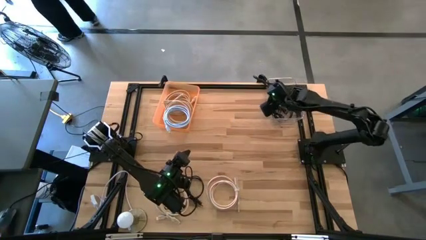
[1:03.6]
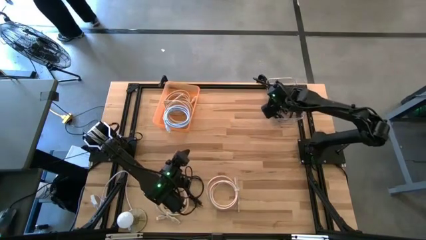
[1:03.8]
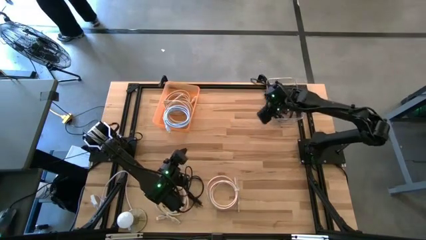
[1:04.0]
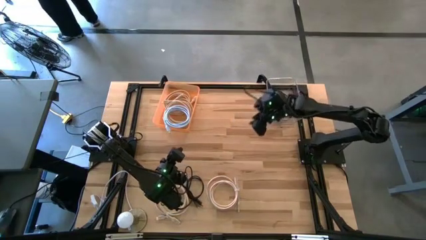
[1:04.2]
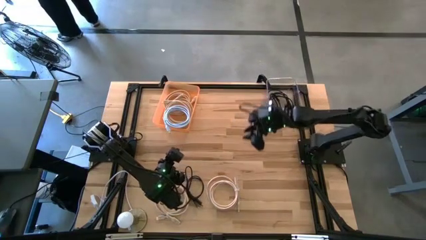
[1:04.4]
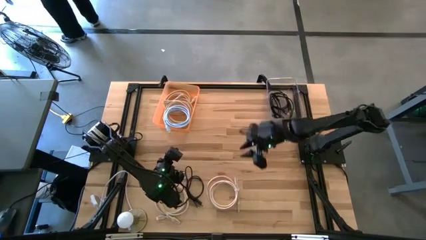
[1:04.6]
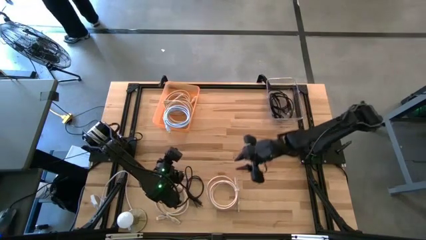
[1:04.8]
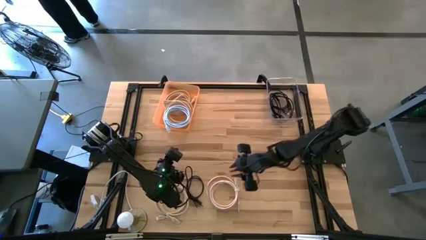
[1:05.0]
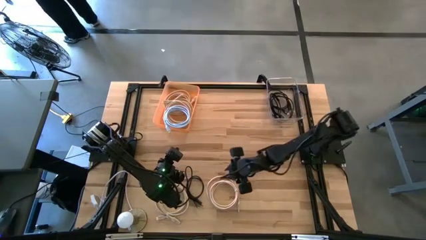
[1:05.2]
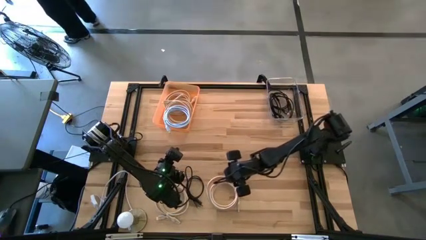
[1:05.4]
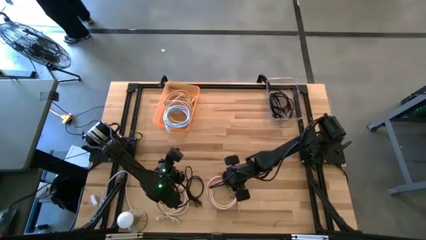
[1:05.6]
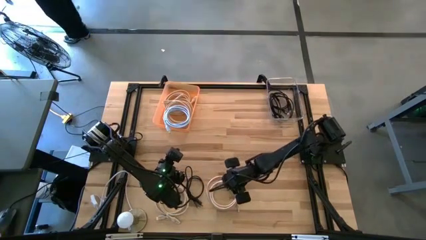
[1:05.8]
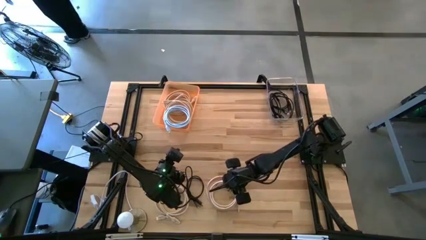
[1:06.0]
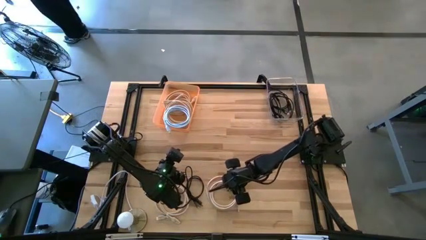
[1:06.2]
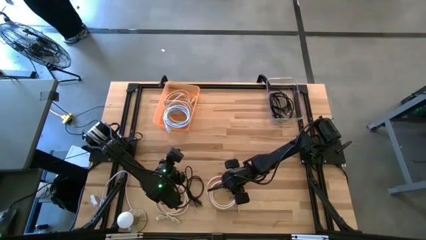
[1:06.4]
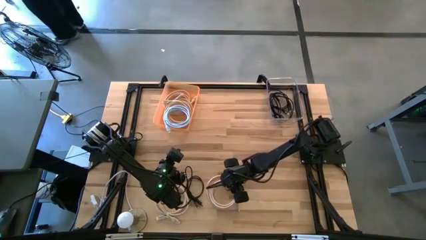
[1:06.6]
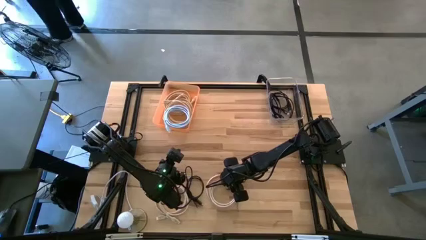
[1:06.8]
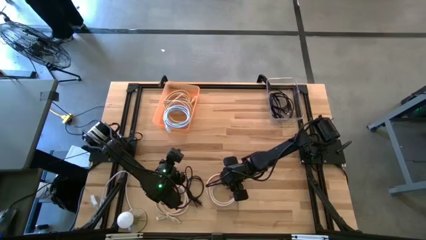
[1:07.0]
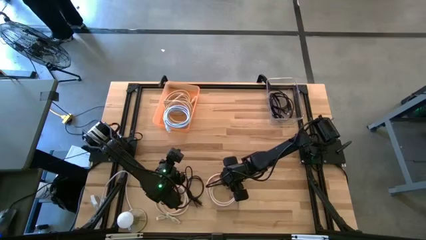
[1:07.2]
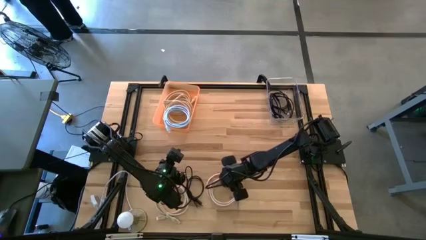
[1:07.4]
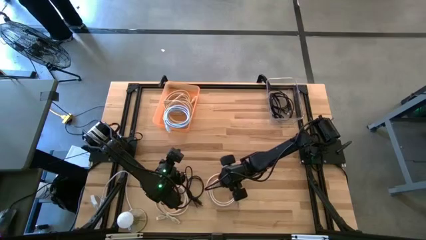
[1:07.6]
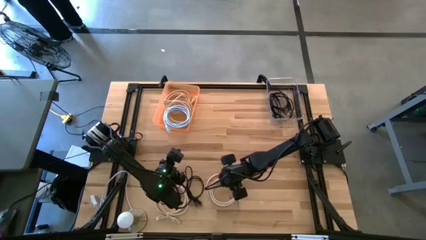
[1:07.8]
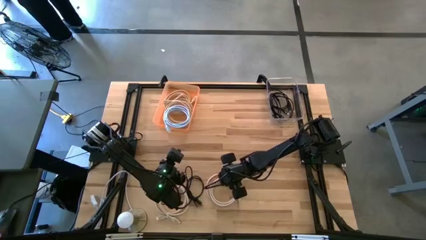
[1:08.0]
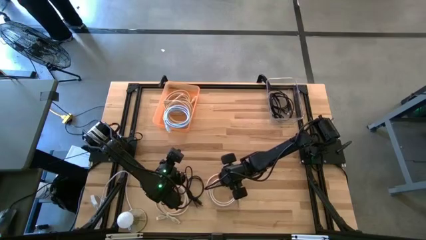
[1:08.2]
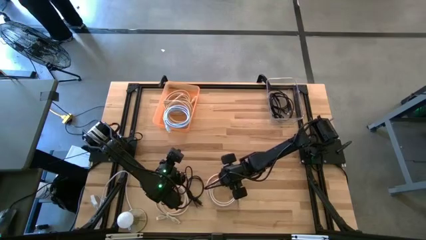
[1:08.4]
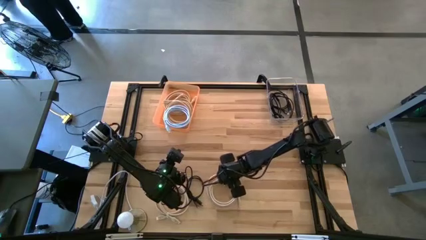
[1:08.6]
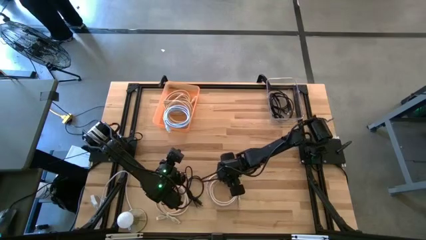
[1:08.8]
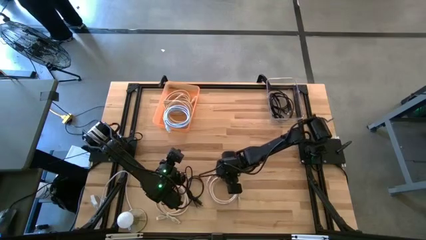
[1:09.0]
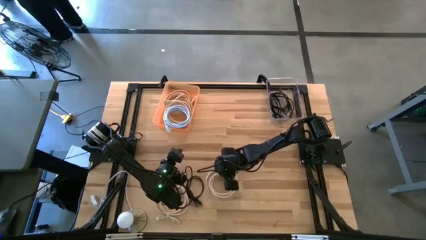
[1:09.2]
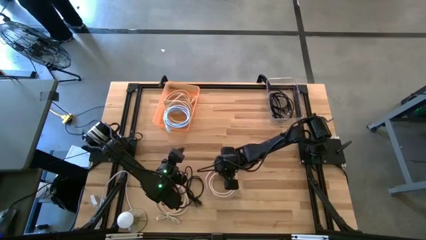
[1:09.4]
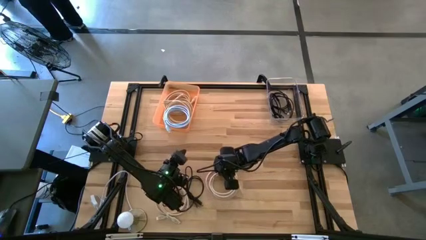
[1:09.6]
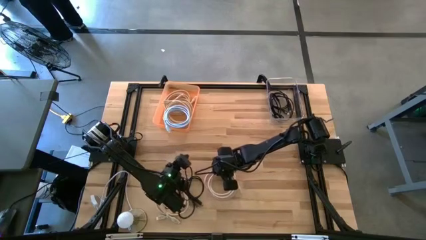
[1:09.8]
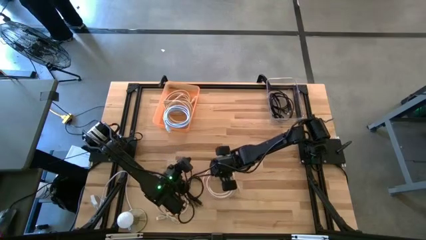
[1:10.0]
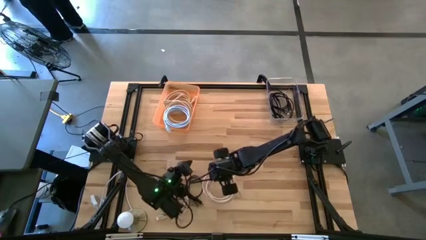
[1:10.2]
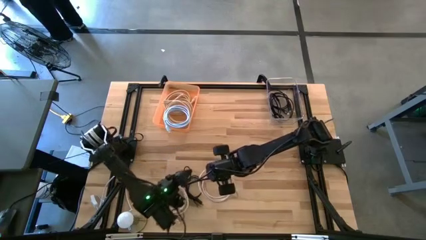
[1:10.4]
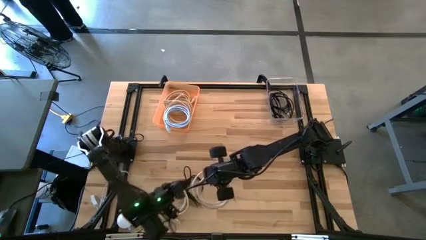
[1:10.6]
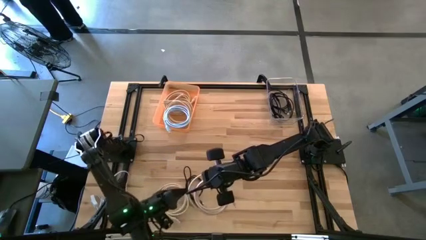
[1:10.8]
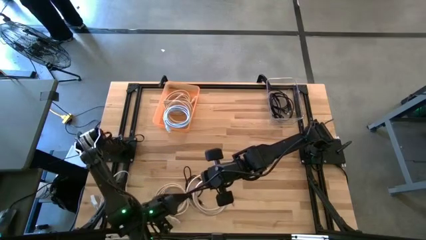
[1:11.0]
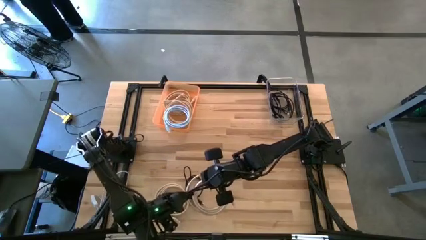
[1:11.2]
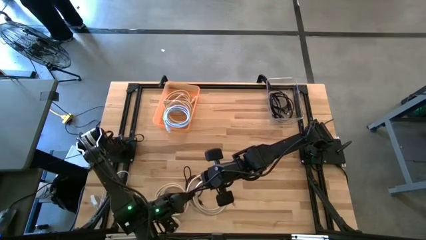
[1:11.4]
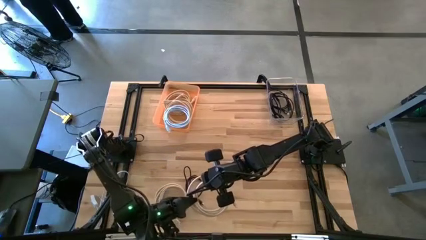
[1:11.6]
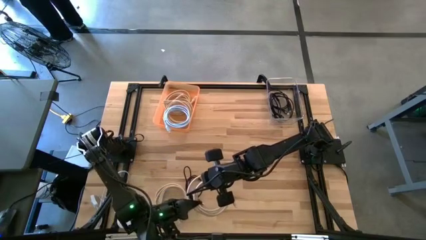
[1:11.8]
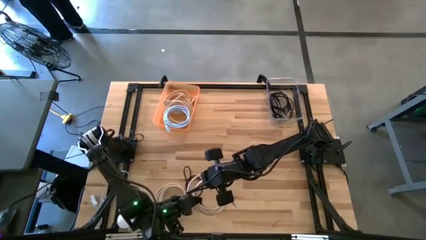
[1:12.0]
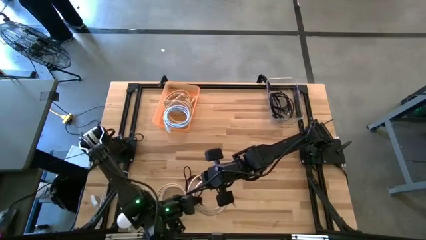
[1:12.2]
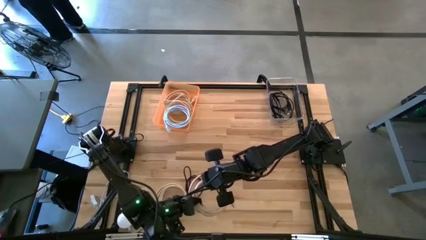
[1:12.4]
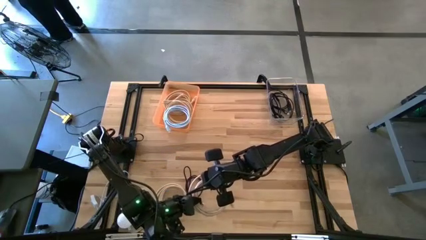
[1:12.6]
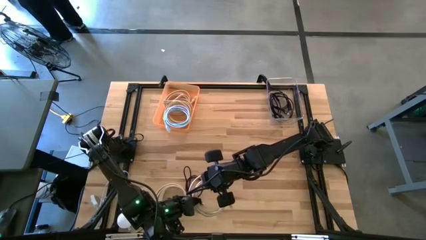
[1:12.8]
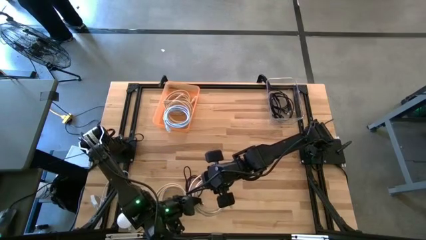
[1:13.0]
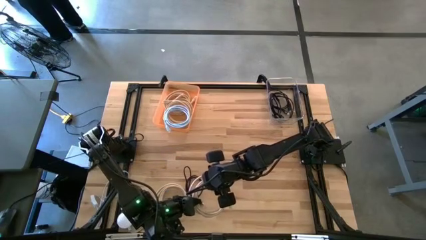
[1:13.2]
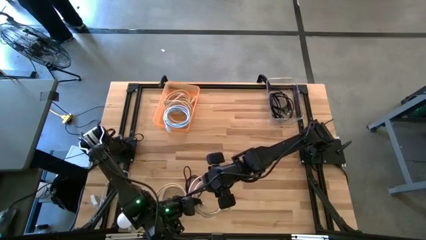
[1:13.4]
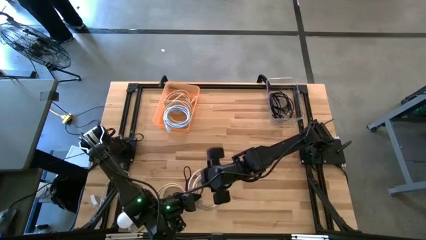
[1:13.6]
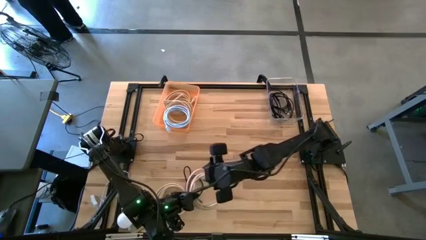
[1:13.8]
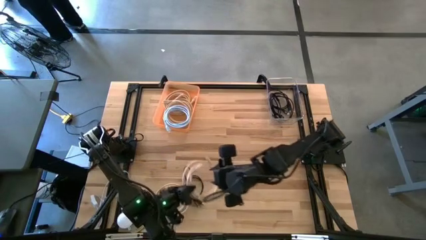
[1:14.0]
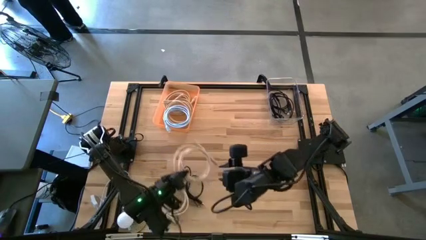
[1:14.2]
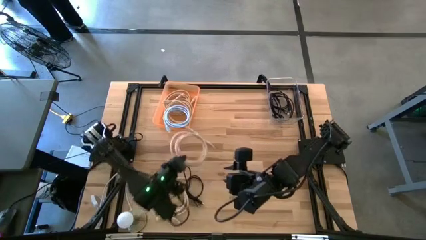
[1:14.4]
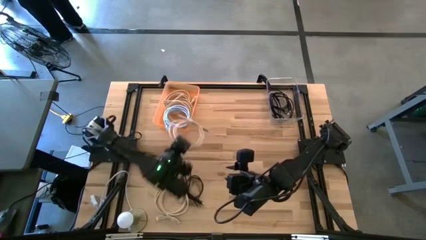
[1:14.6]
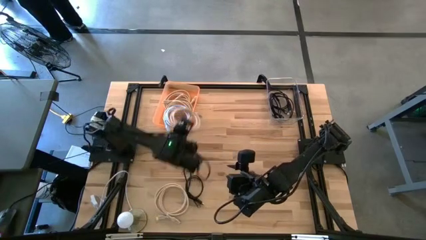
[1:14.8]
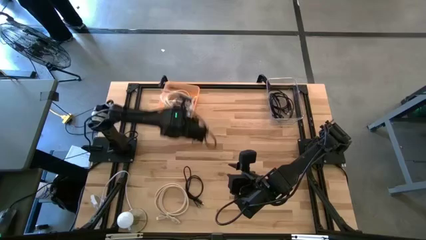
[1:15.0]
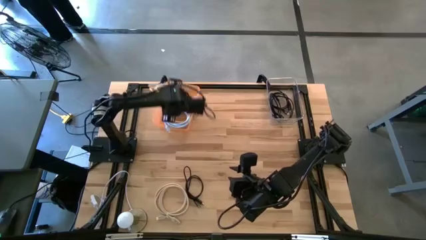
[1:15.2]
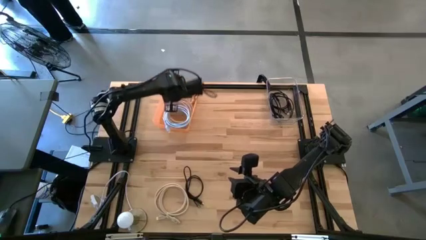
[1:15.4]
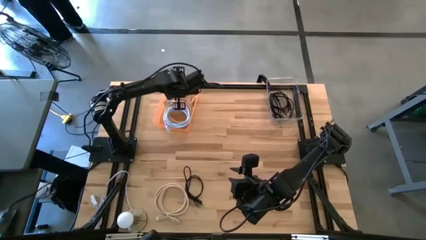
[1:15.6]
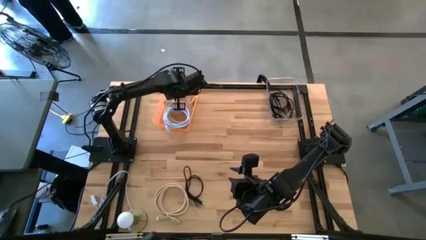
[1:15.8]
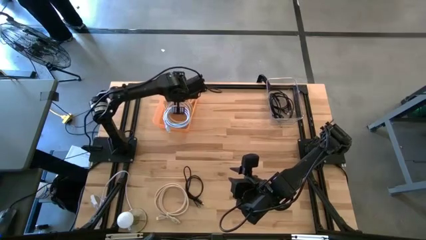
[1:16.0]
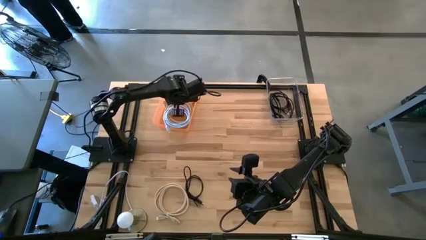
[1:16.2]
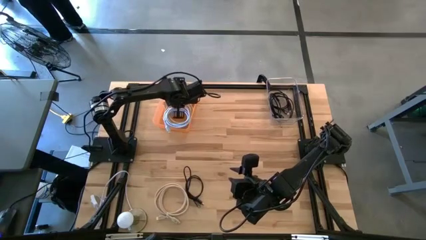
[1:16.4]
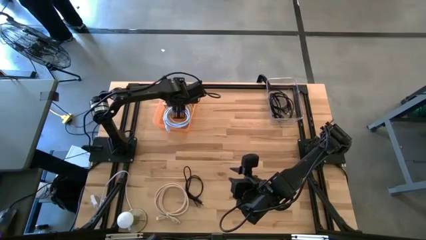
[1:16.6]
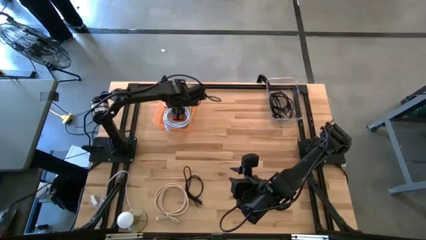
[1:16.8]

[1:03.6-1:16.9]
Task: Pick & Place USB Port
Put the light brown hdmi cable into the orange bin

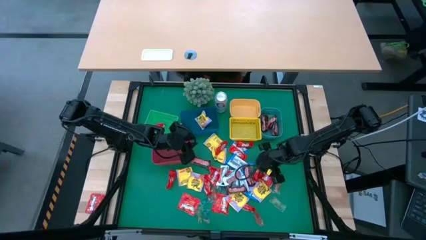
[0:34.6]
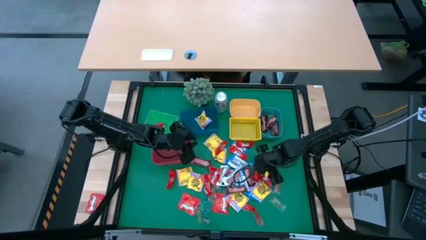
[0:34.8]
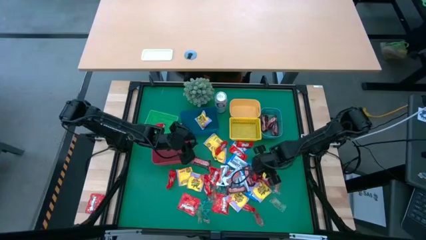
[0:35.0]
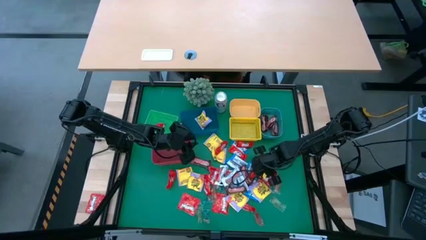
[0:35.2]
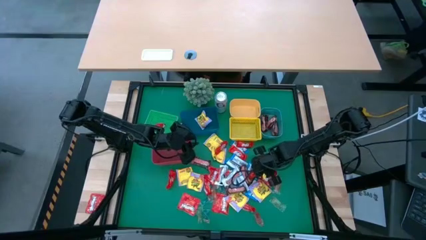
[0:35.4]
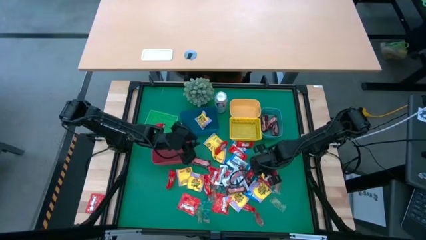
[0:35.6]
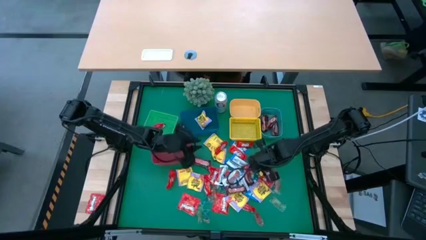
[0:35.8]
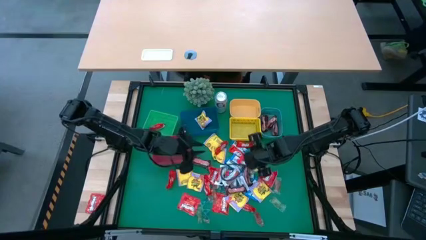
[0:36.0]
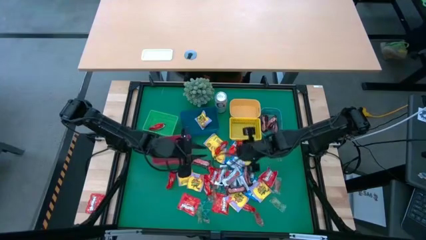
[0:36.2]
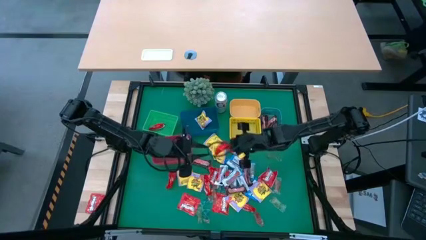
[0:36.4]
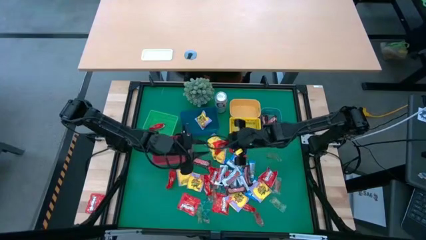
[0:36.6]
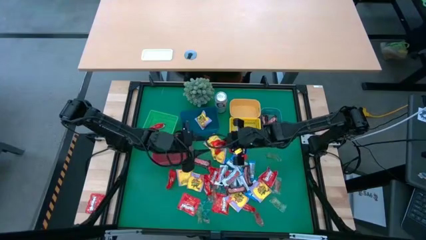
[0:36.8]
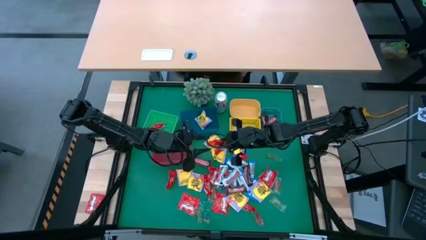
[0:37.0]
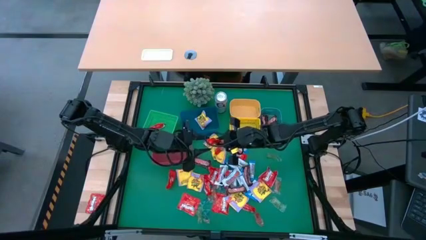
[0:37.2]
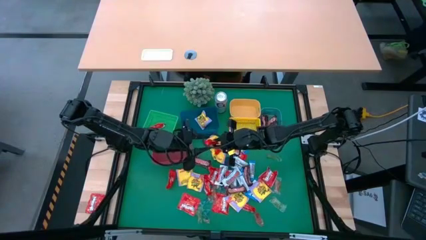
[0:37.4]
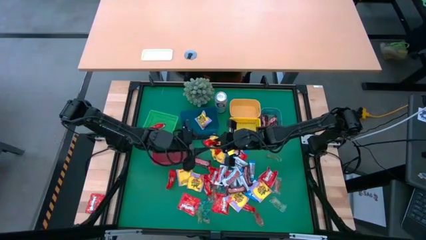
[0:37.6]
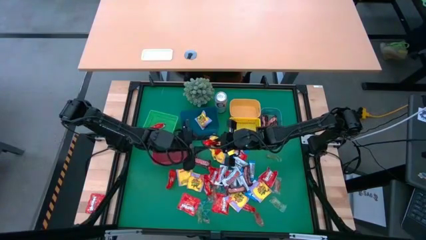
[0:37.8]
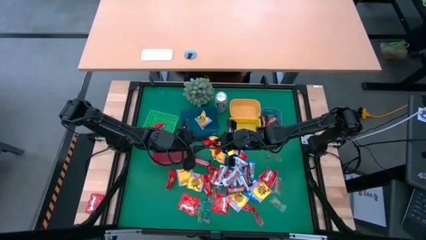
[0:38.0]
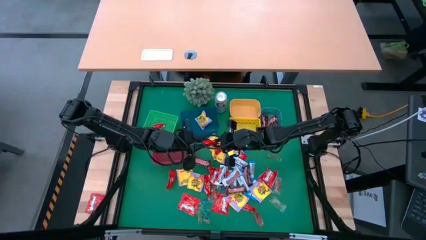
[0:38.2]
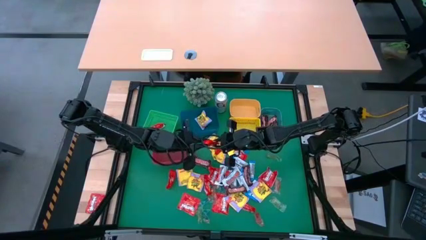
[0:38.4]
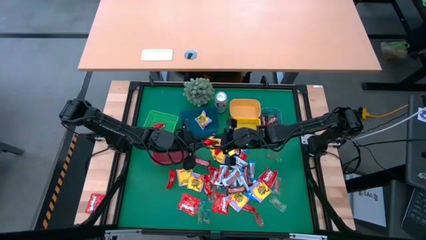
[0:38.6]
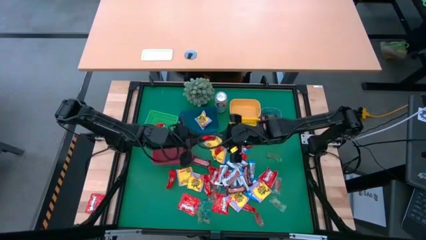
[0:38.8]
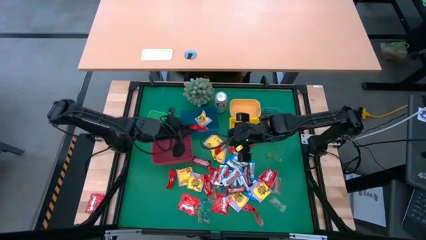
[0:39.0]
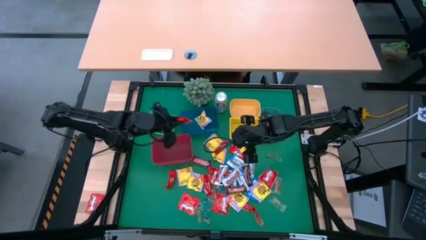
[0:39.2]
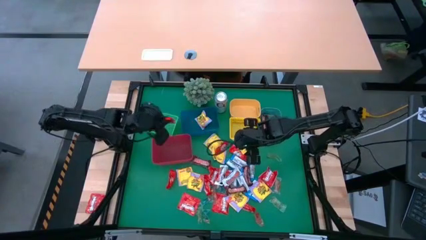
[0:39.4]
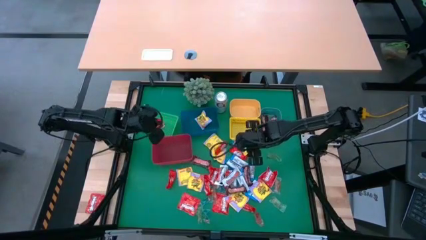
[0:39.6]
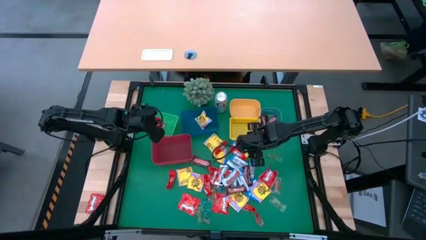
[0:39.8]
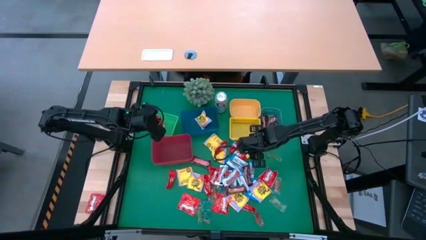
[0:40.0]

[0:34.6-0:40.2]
Task: Sort candy
Put the red chocolate bar into the green bin
